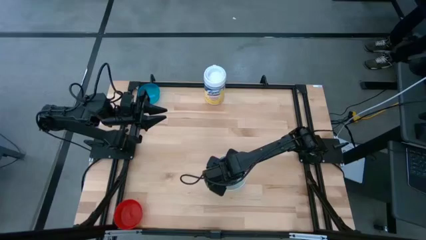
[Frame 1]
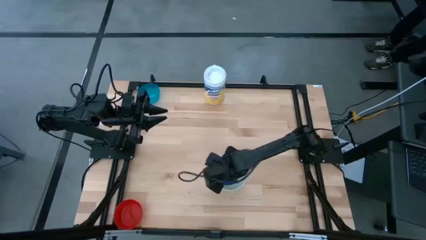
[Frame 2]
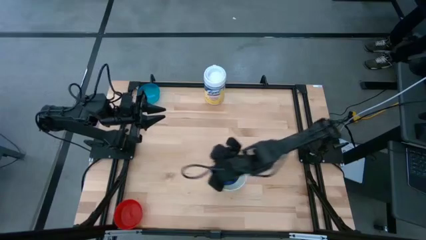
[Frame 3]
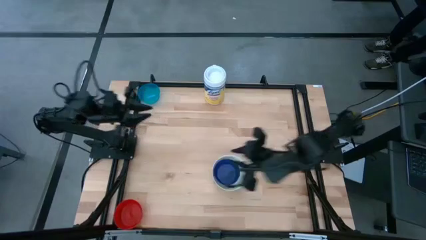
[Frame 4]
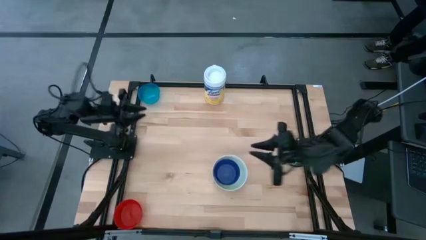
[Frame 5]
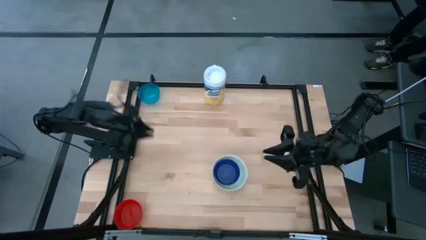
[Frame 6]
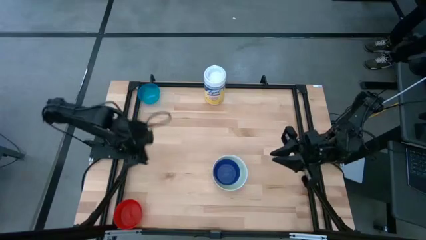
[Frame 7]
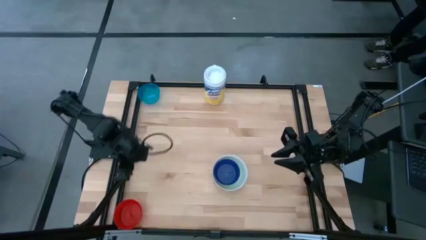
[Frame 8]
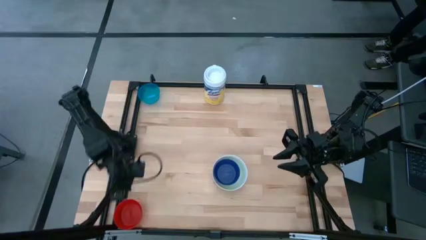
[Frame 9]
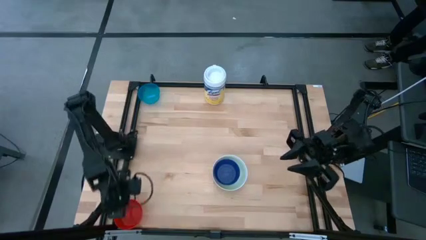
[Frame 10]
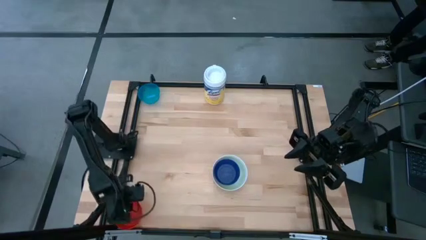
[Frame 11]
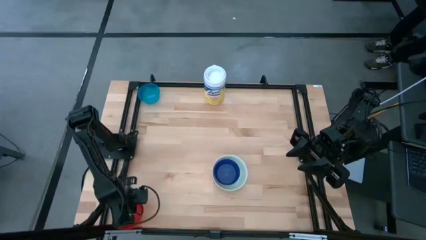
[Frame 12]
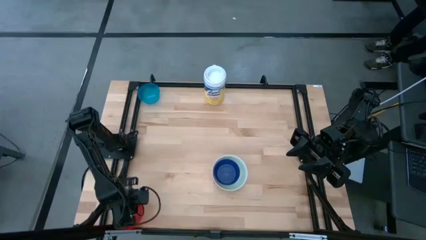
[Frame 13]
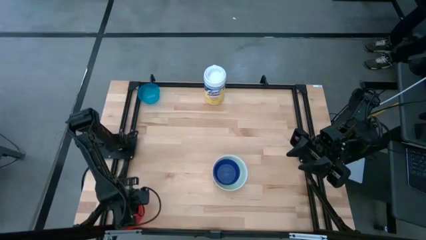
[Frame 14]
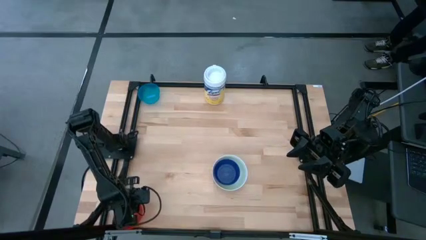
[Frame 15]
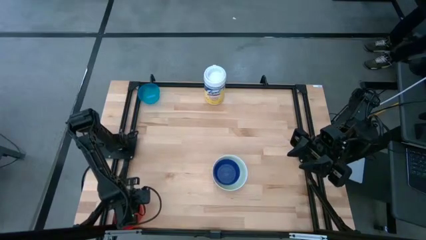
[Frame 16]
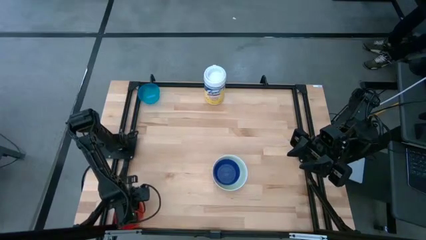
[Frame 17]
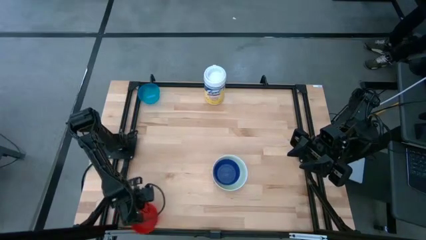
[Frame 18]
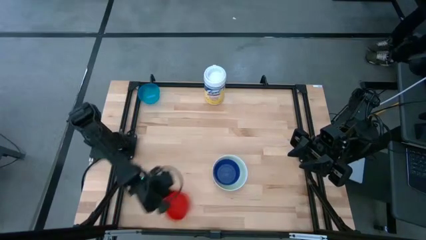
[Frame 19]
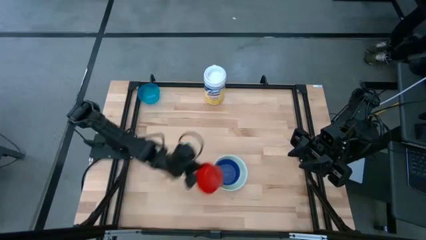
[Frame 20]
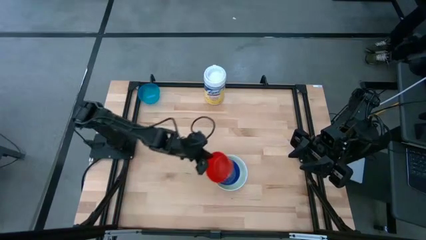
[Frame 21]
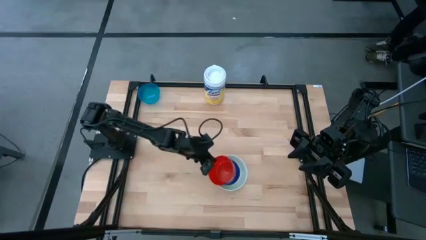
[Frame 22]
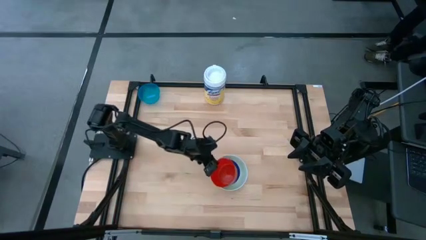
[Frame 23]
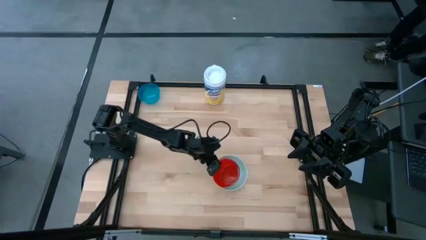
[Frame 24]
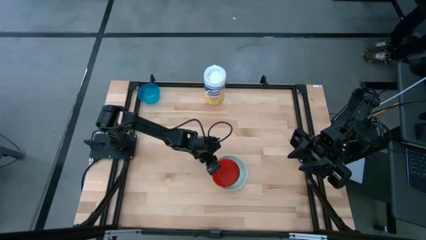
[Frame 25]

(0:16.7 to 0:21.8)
Stack the red bowl on the top of the blue bowl

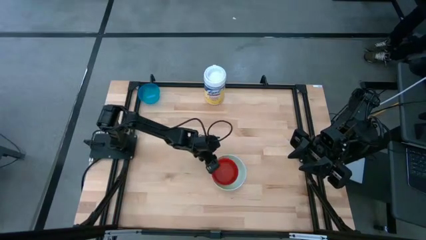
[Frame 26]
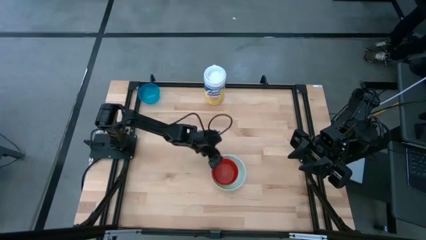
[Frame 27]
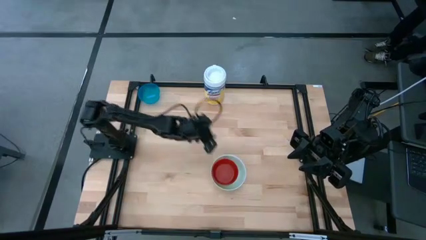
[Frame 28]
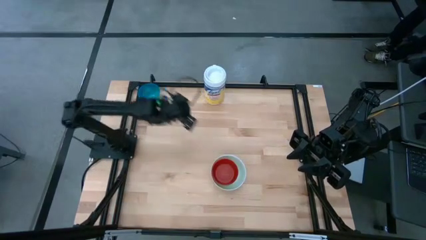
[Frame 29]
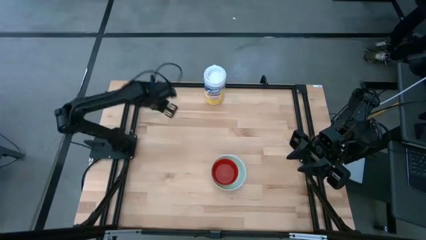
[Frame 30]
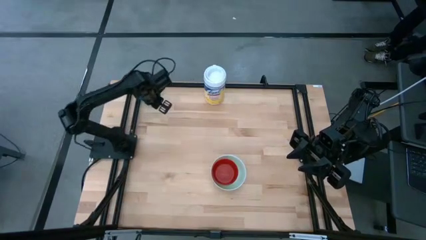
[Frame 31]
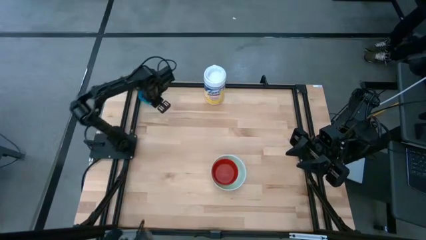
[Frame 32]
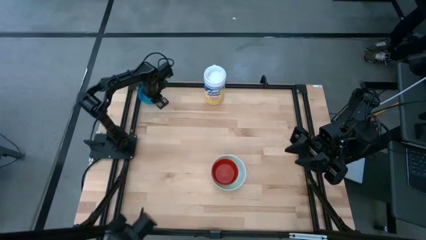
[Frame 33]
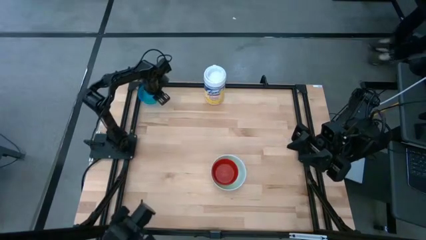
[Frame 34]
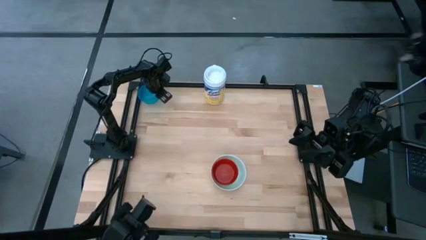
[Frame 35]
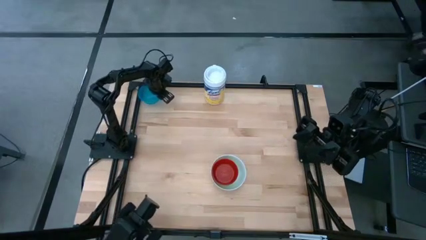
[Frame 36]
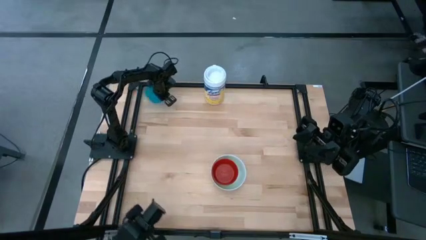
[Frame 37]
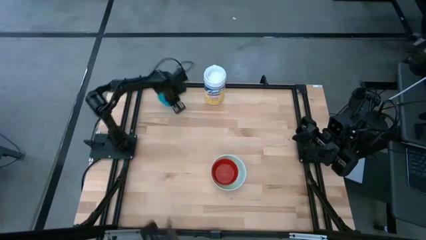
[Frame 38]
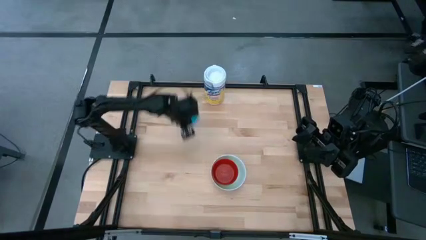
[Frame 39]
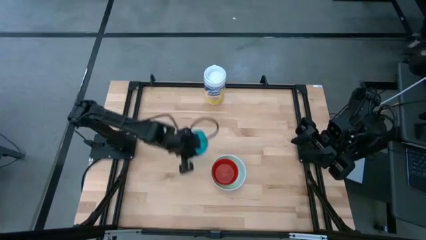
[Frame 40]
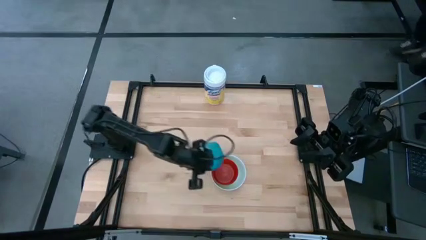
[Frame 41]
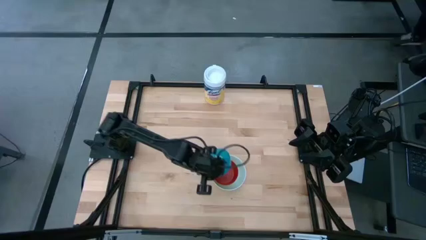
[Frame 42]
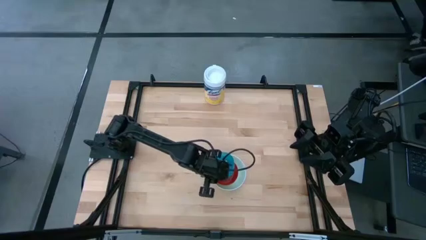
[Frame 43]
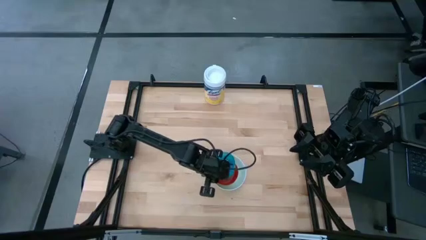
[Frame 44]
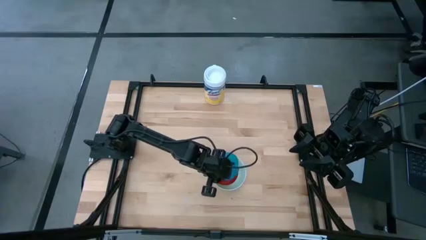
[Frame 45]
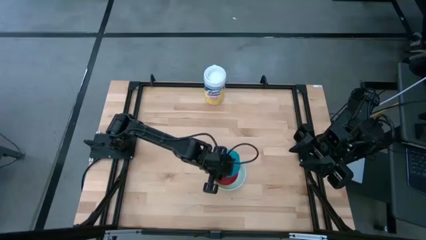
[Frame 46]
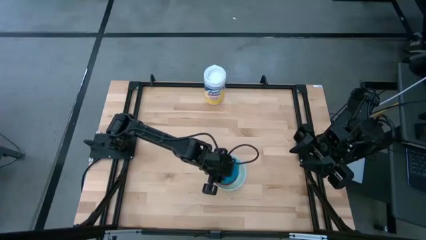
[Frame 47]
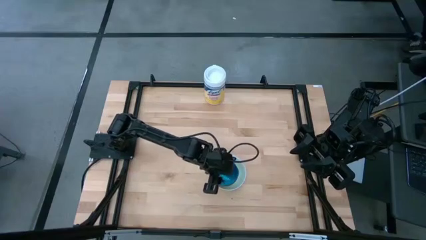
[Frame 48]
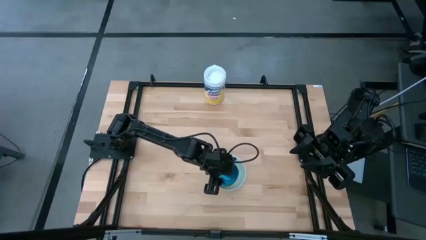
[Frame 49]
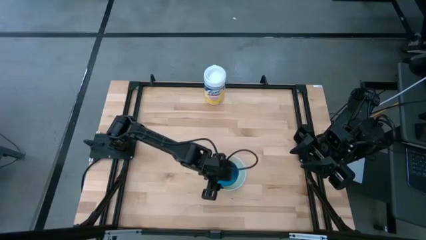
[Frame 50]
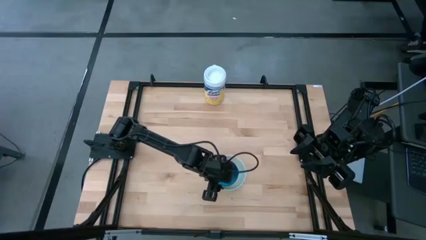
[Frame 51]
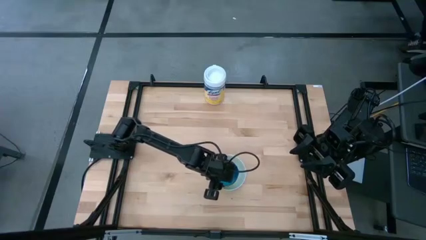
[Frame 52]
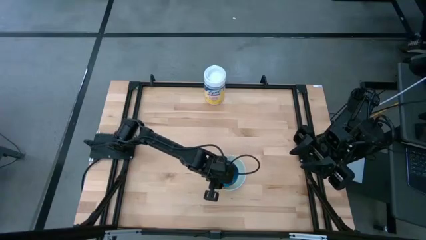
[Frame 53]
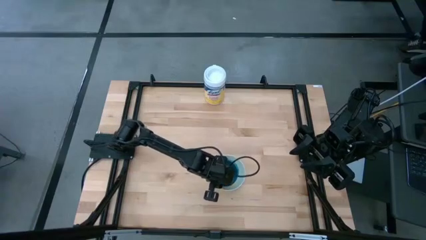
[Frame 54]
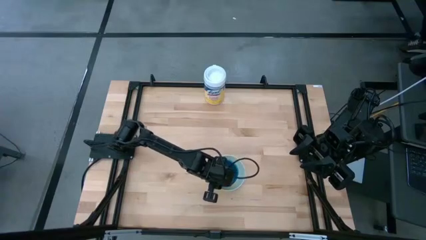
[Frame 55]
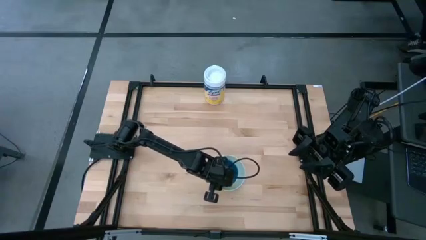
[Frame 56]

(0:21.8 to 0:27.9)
Stack the light blue bowl on the top of the red bowl

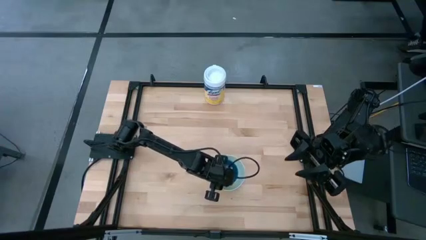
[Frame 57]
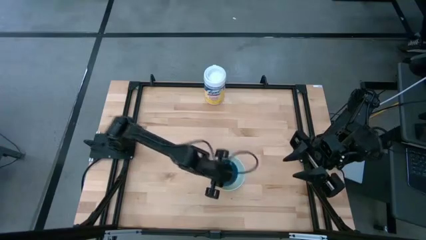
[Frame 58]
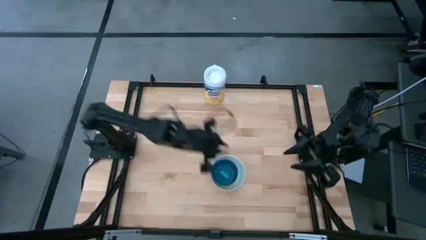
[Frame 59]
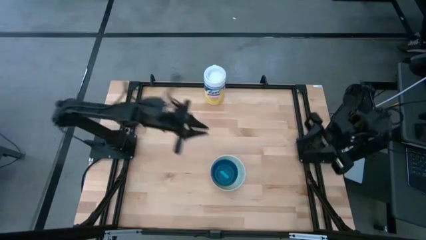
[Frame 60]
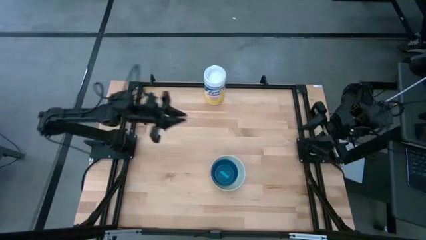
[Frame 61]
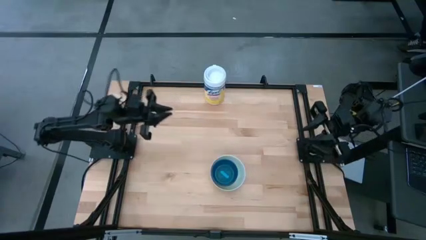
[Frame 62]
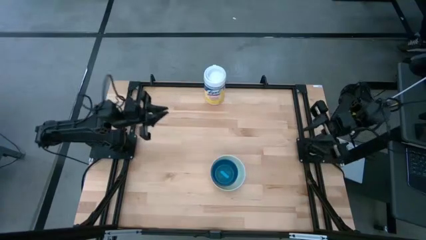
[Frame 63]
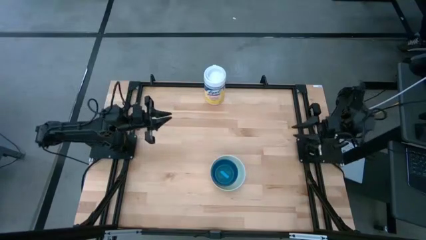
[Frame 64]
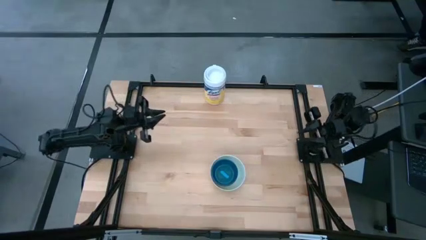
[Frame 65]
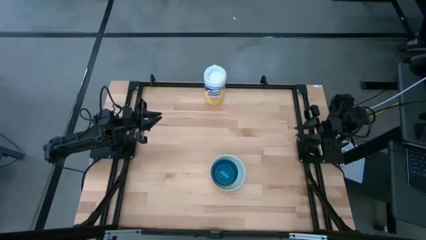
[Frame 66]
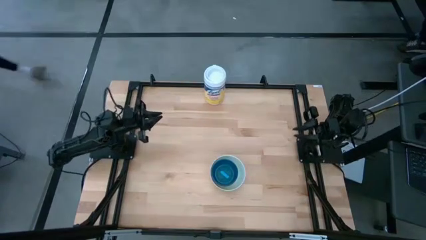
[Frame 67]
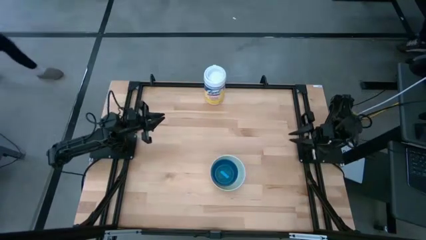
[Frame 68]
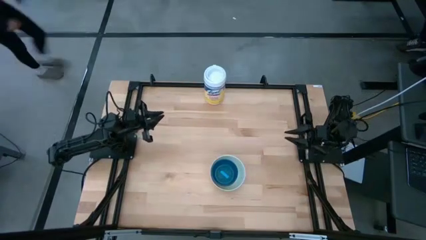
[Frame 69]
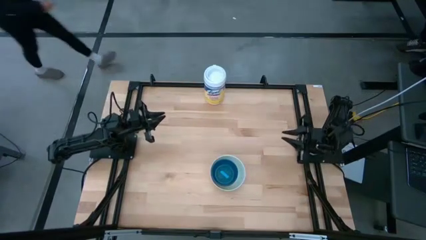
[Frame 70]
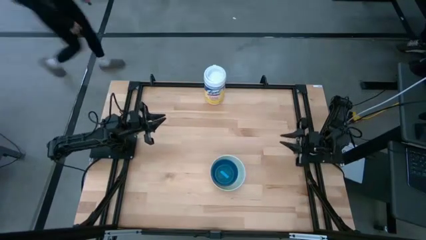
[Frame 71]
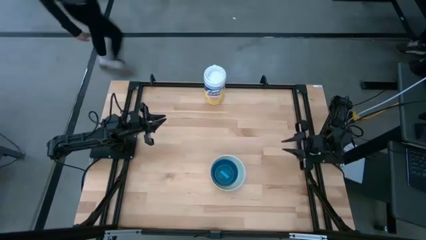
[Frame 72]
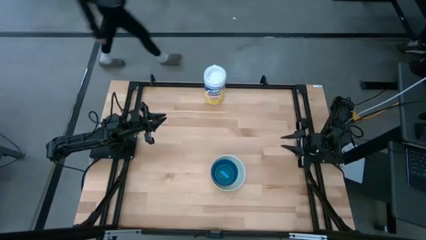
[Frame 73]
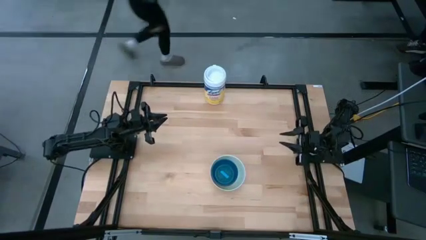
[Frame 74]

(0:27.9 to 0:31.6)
Return to Home Position
